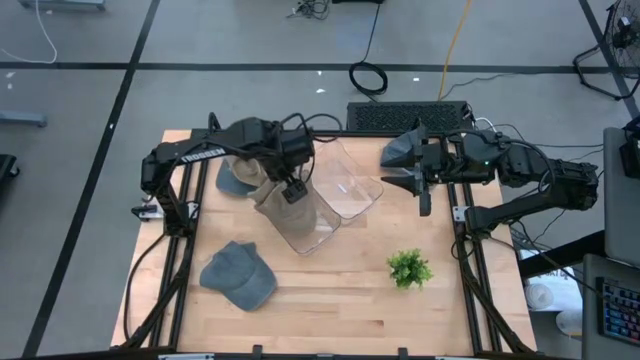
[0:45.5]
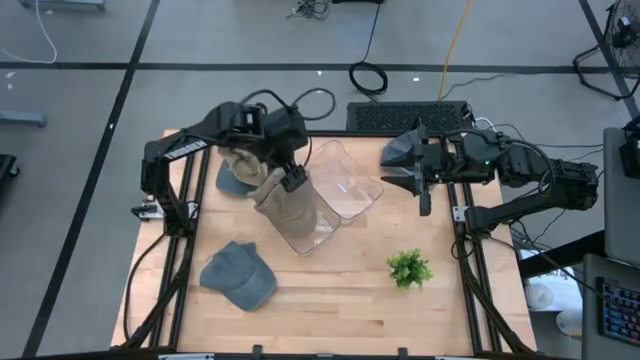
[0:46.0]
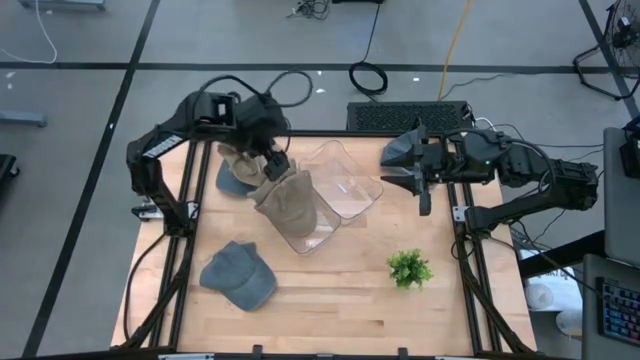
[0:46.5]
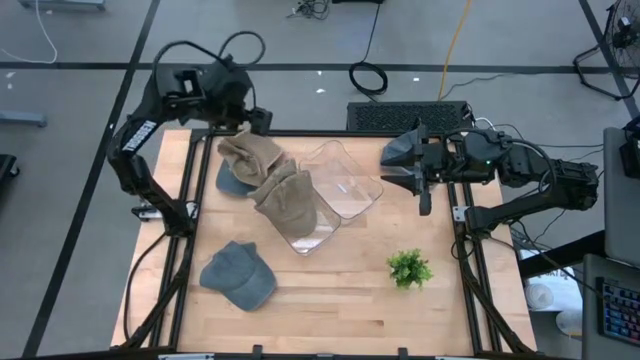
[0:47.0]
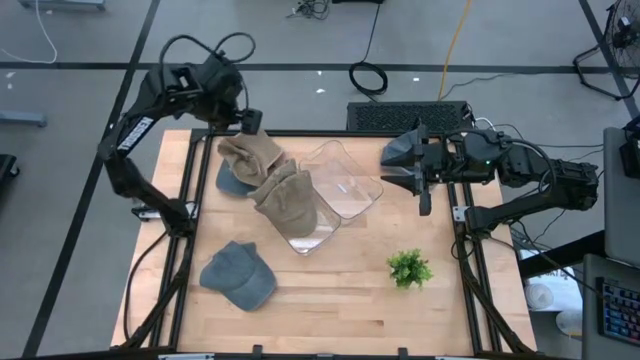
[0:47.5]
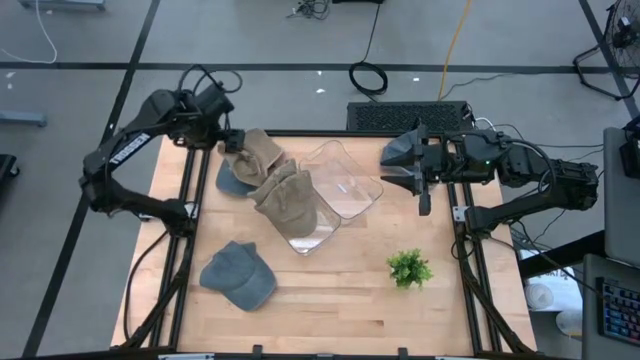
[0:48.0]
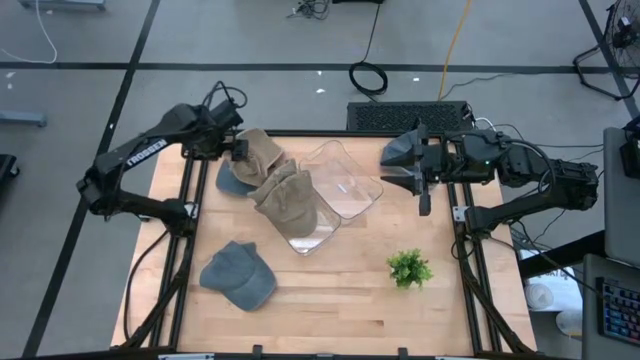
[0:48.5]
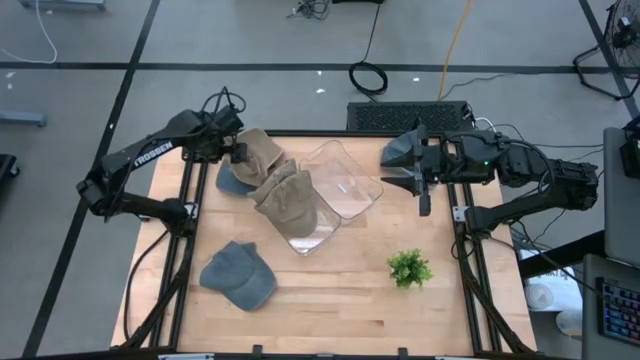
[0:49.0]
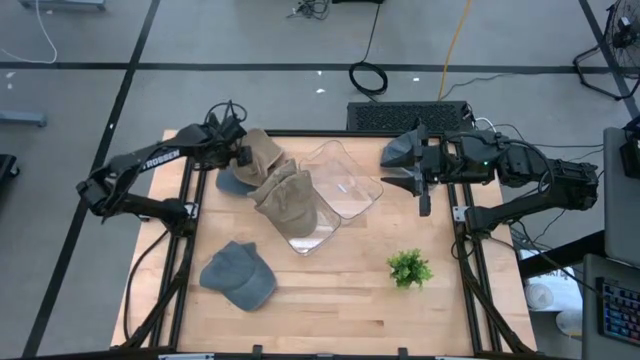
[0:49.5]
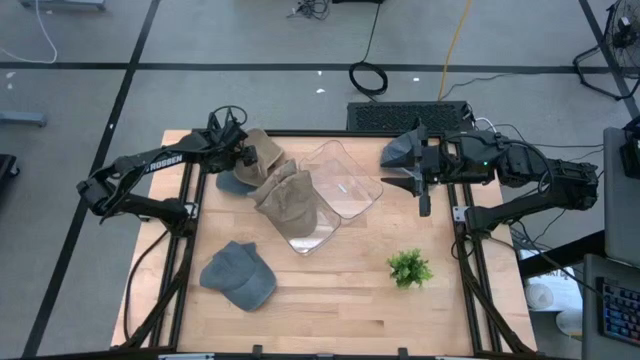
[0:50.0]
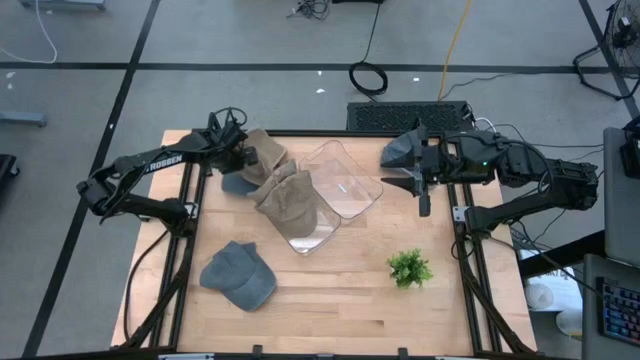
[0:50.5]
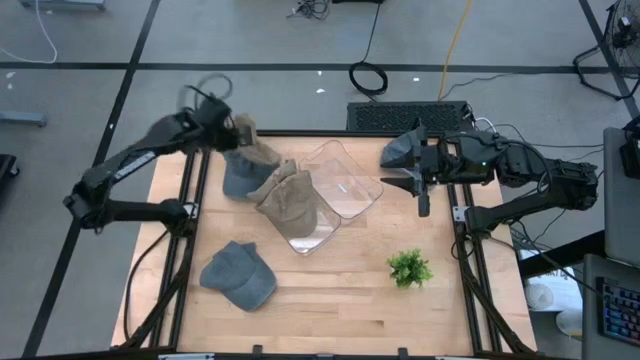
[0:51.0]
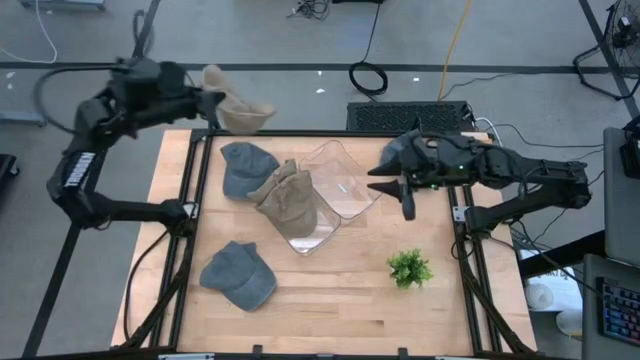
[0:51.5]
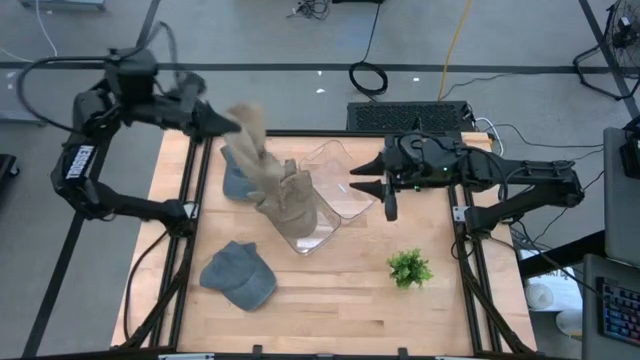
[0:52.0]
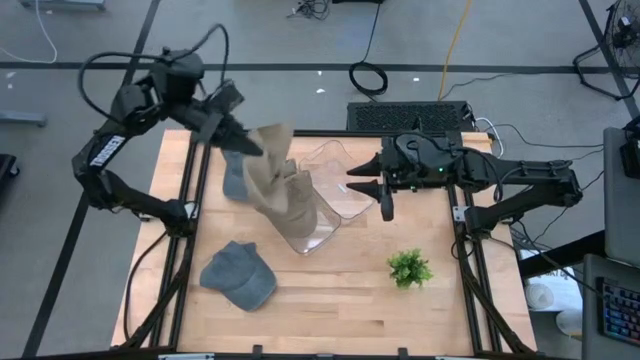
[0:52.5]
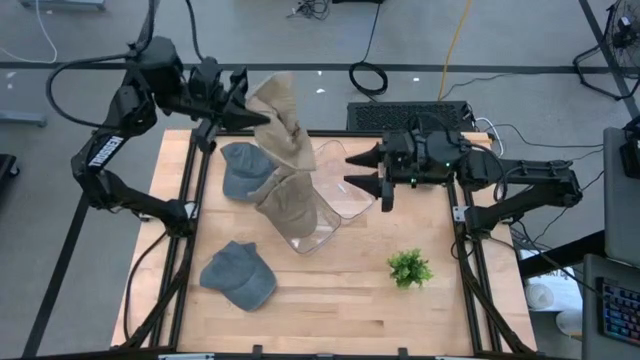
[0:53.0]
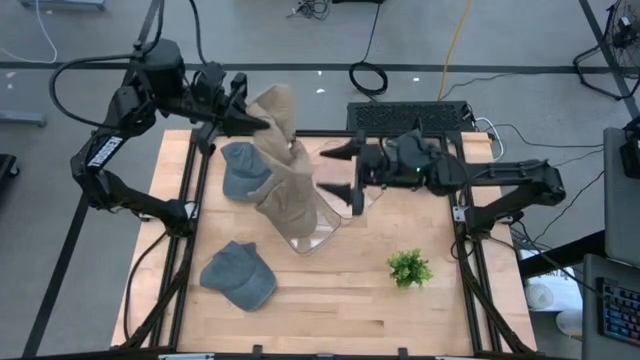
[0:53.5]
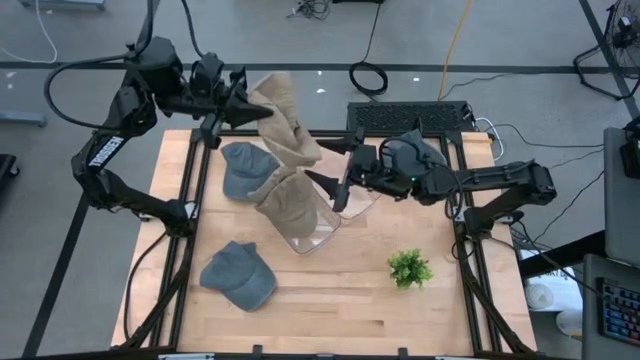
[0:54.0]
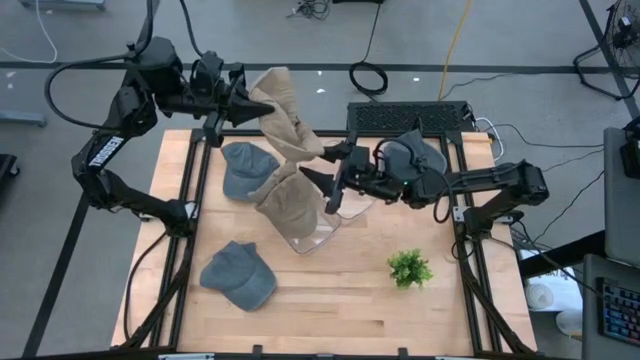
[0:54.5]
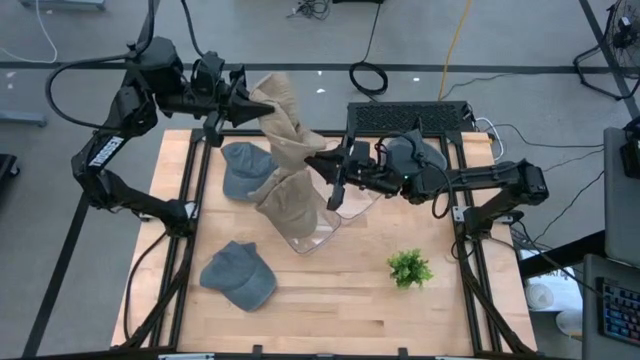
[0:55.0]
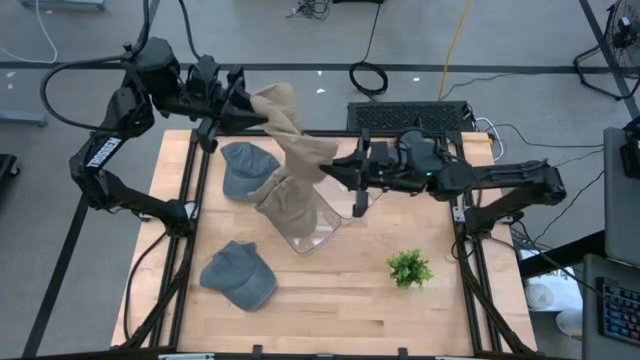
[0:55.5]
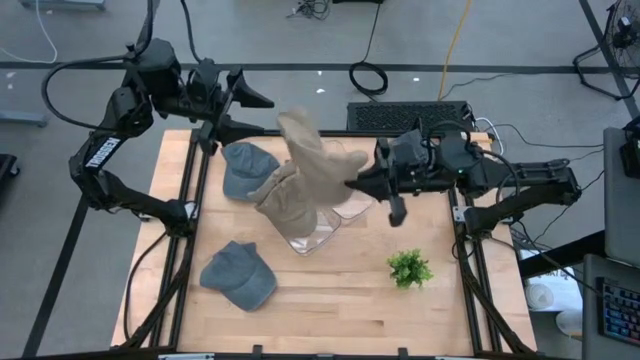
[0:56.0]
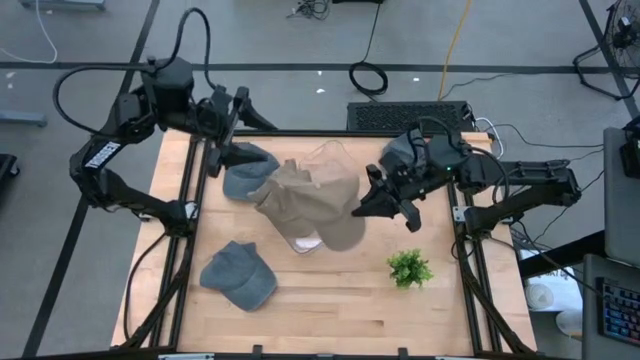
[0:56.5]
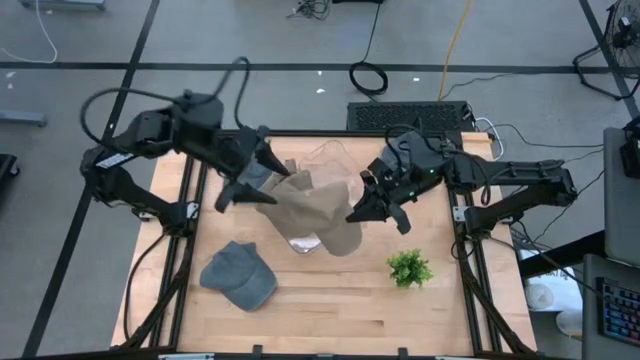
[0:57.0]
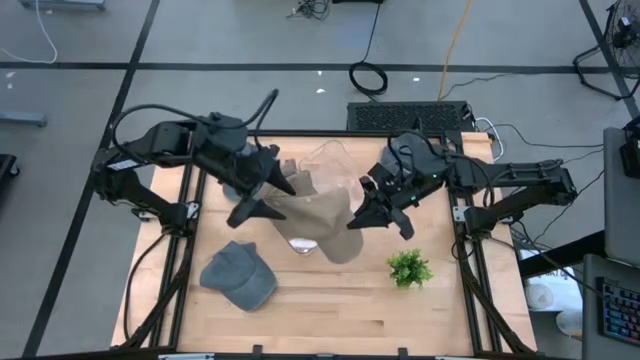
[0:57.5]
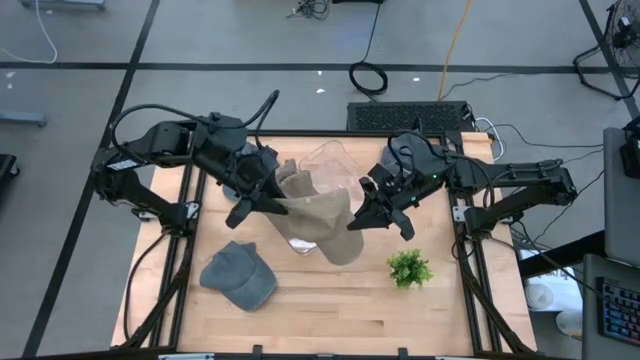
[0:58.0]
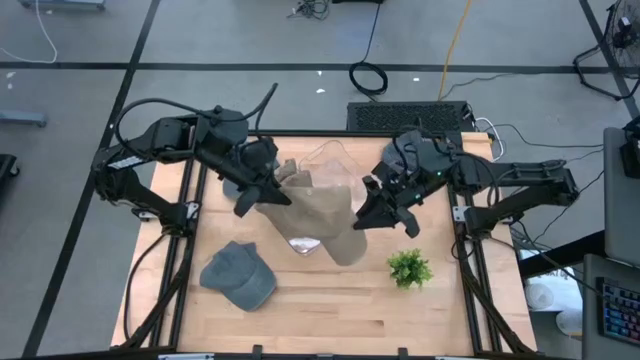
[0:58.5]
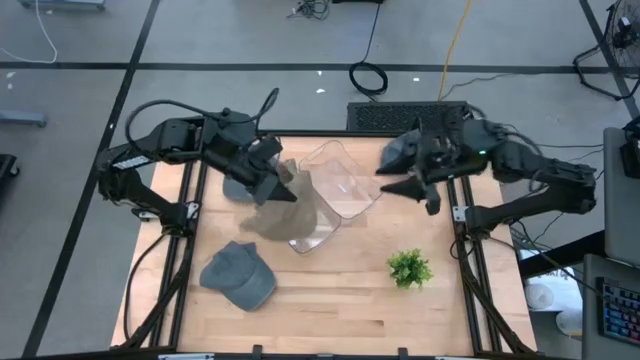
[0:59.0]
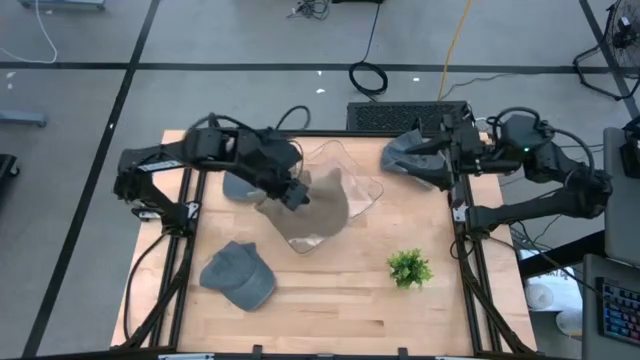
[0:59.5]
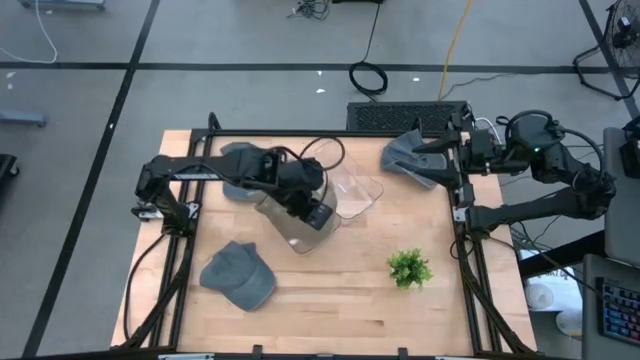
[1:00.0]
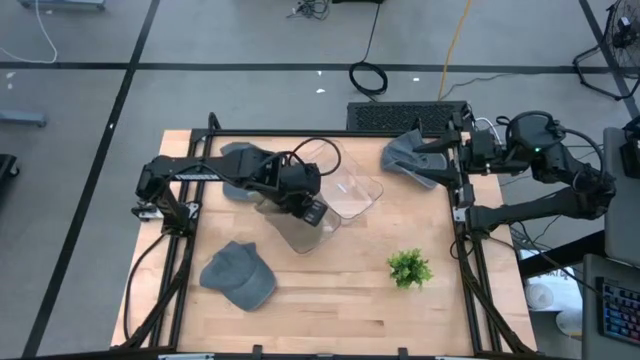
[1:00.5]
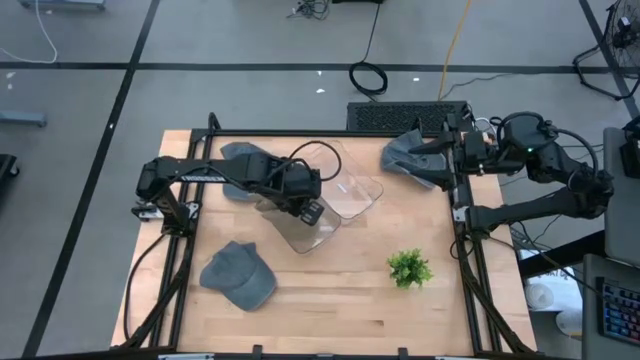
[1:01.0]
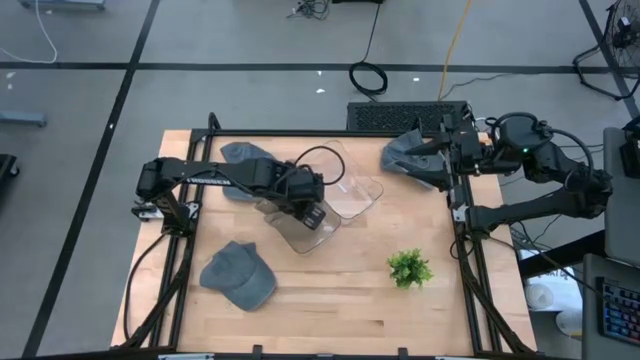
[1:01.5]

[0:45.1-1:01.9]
Task: Pick & Place hat
Put the brown cap into the left transparent bin

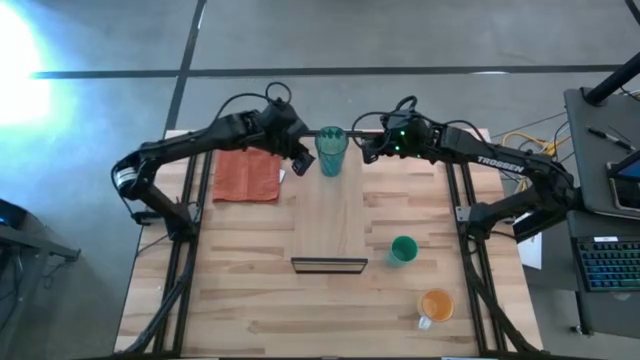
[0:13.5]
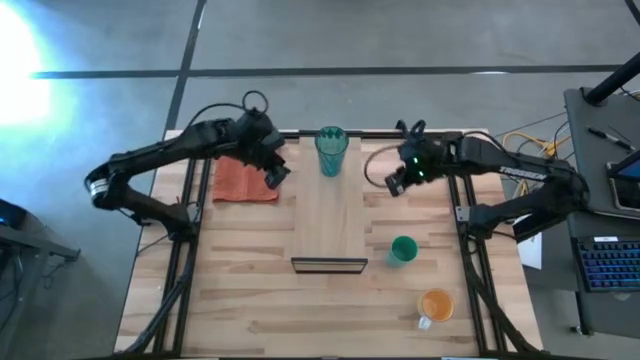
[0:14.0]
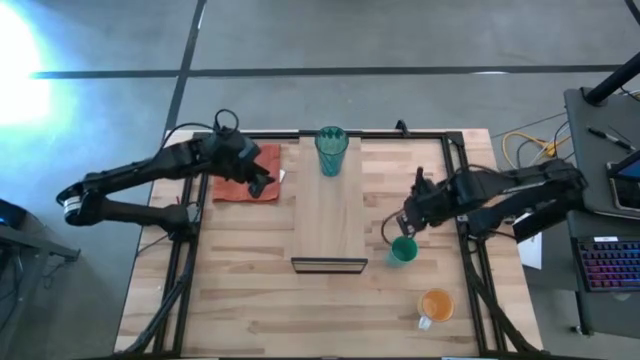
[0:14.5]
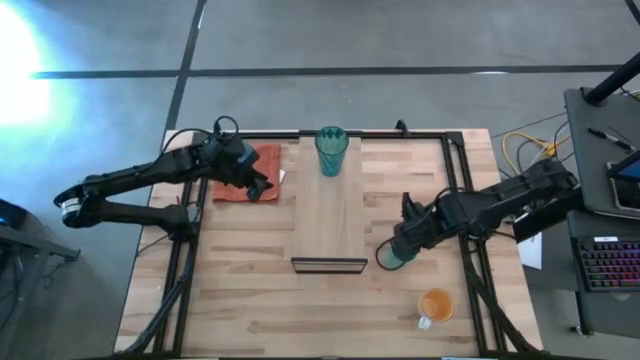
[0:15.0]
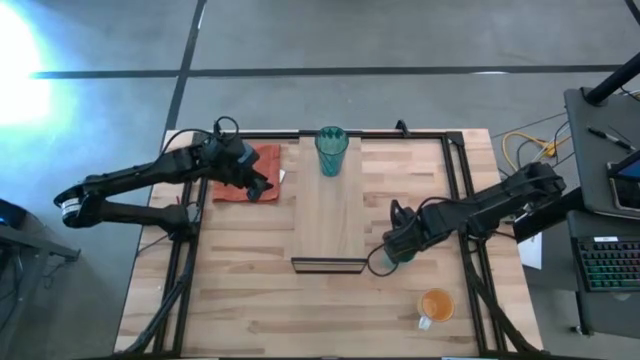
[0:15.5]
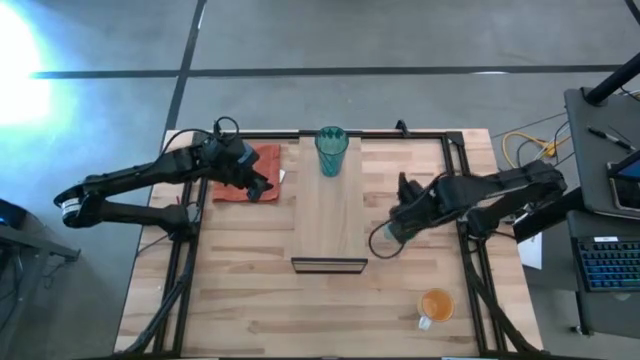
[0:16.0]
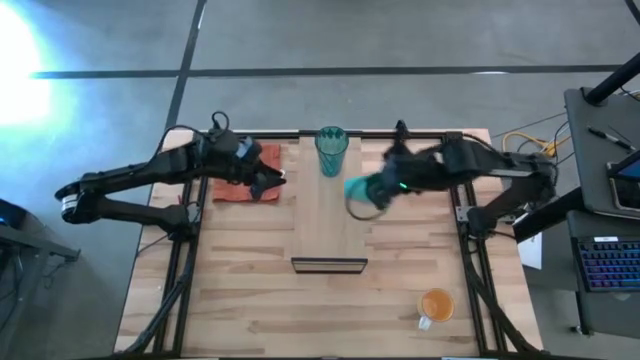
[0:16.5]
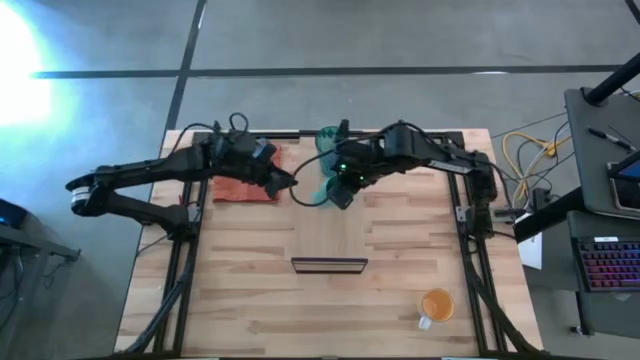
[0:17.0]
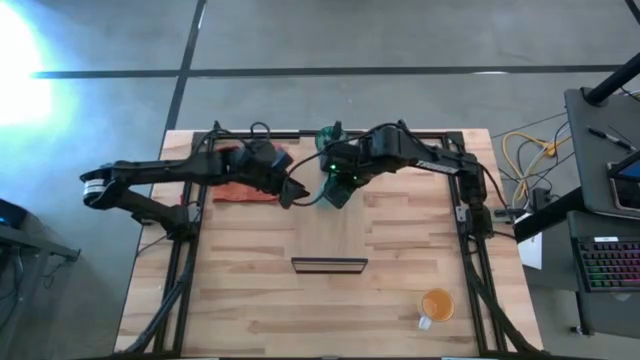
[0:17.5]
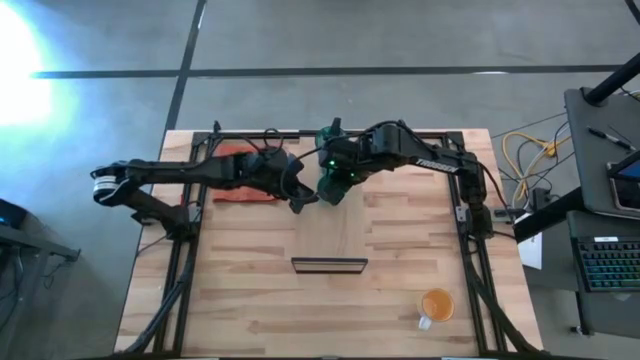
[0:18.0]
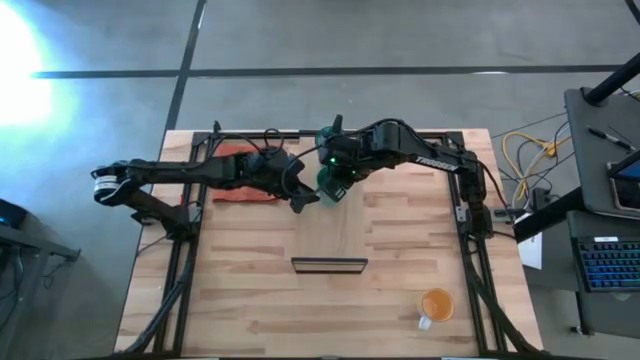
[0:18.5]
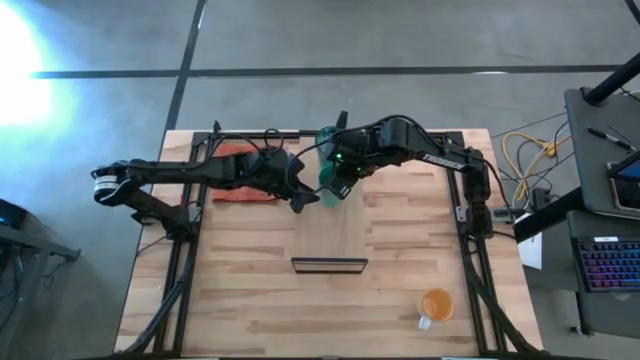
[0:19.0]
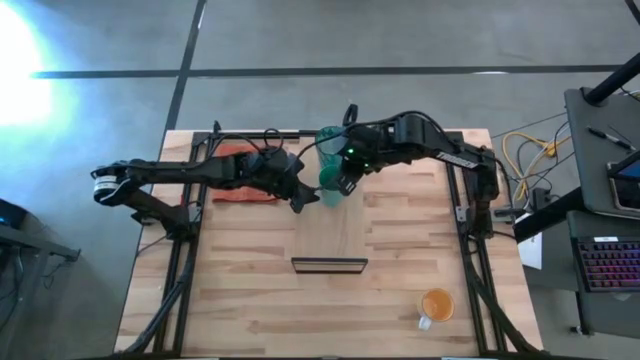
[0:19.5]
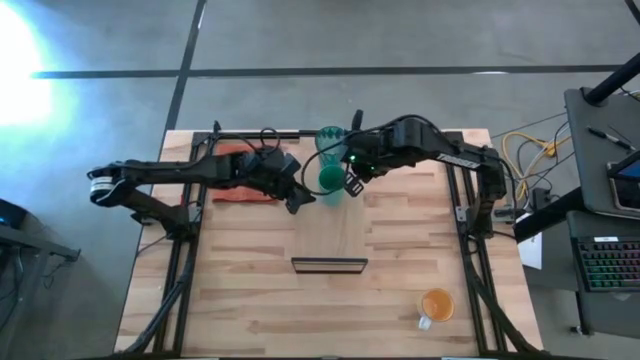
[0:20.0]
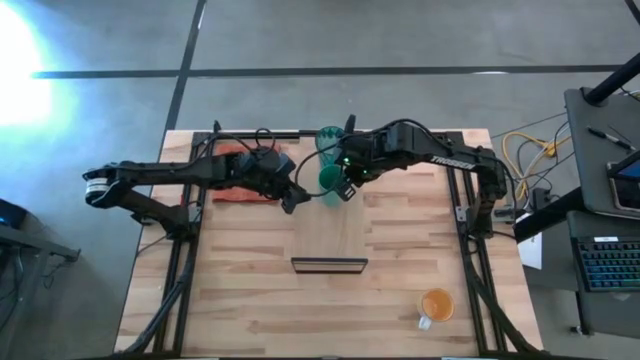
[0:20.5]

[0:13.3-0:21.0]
Task: Stack small to large cups/mugs on shelf
Put the green cup on the shelf
